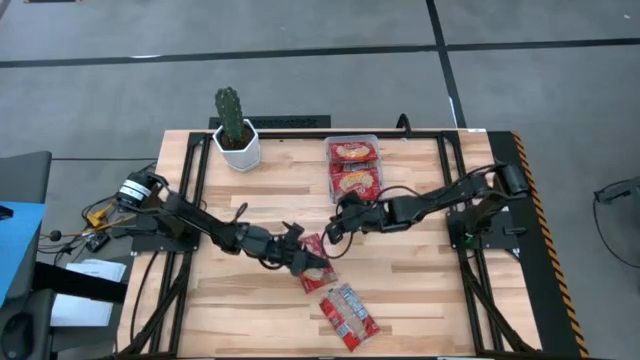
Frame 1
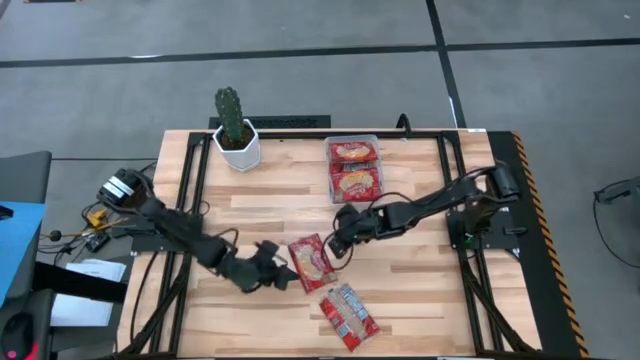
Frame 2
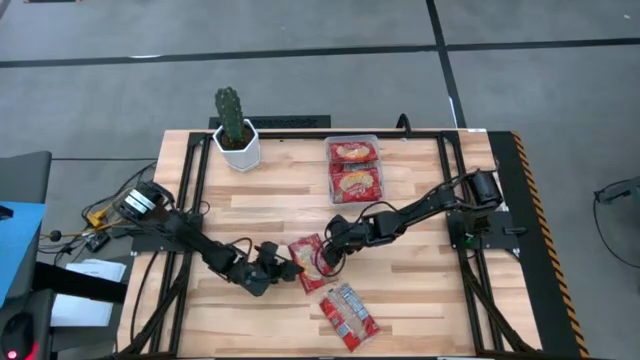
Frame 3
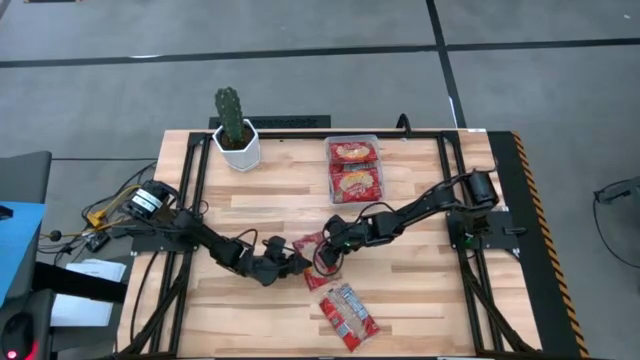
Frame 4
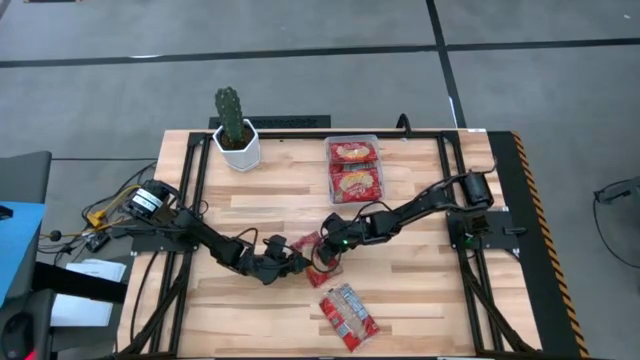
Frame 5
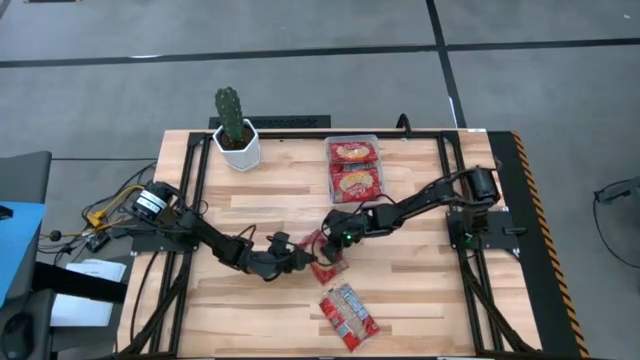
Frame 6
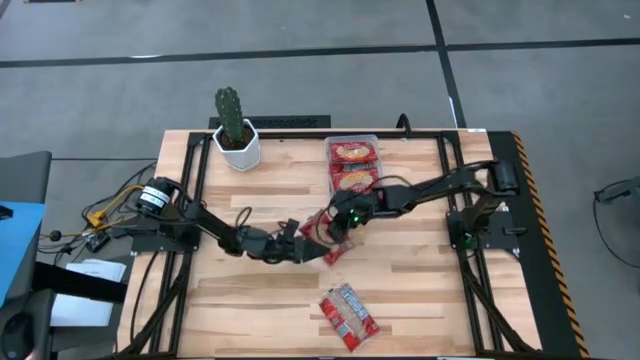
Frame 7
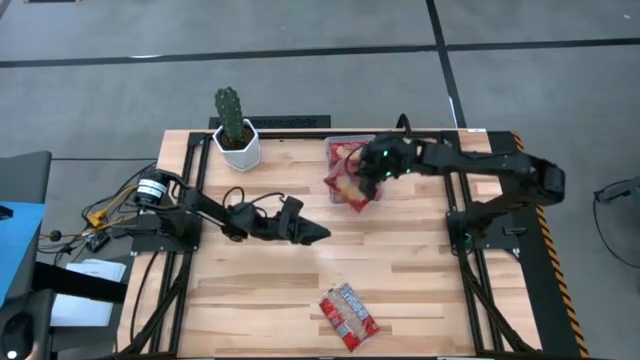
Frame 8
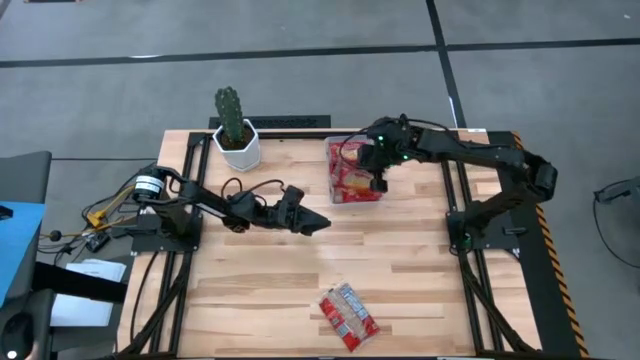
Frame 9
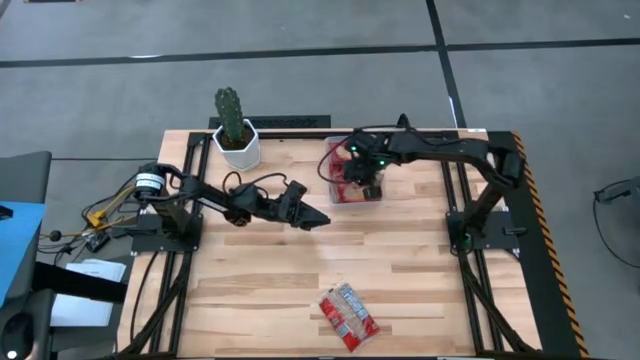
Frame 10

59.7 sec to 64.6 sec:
Task: Sort popcorn bags into baskets
Put the popcorn bag into the transparent bin

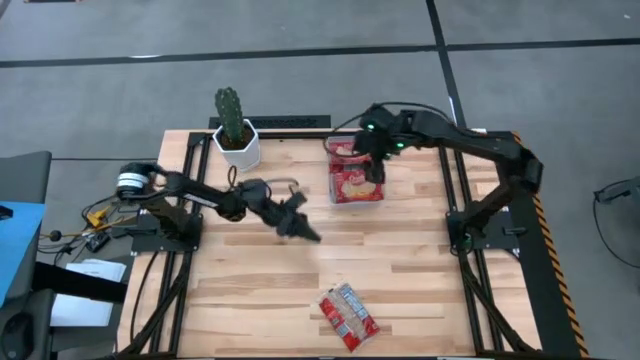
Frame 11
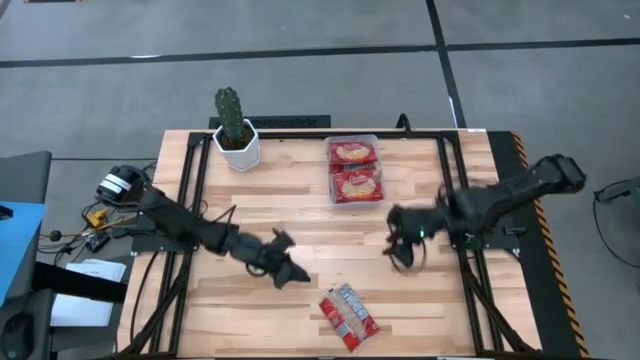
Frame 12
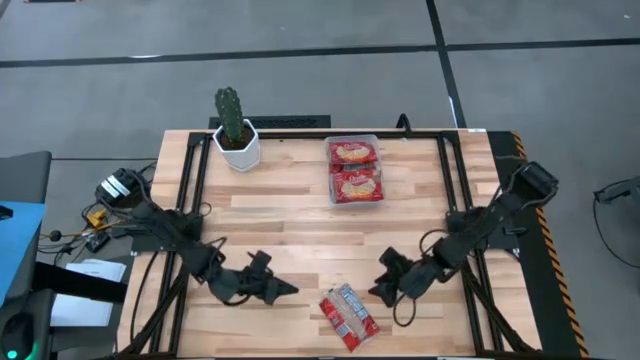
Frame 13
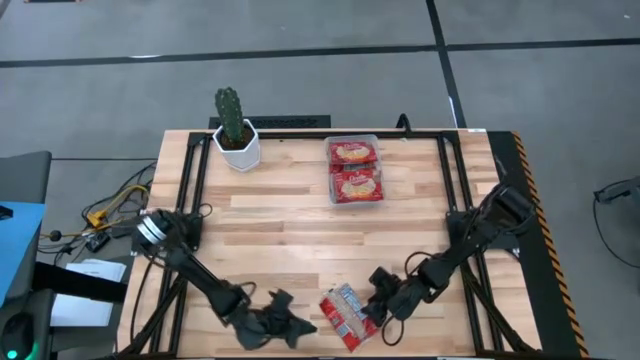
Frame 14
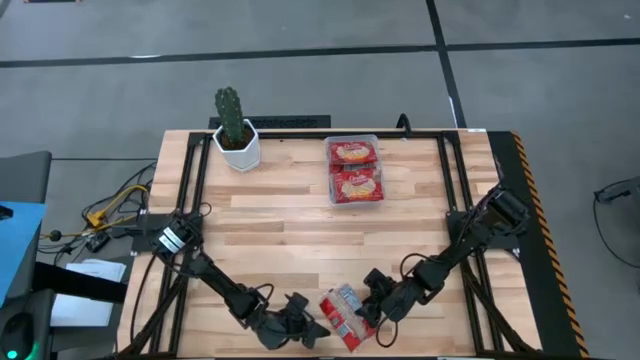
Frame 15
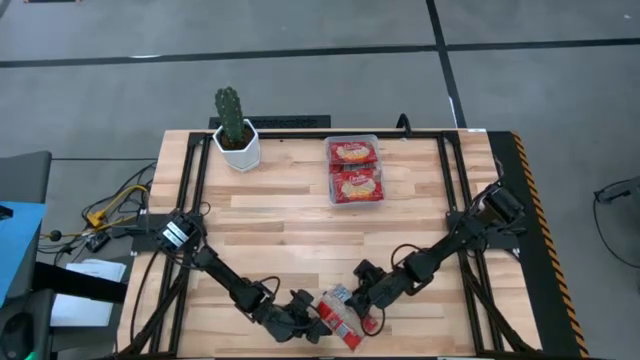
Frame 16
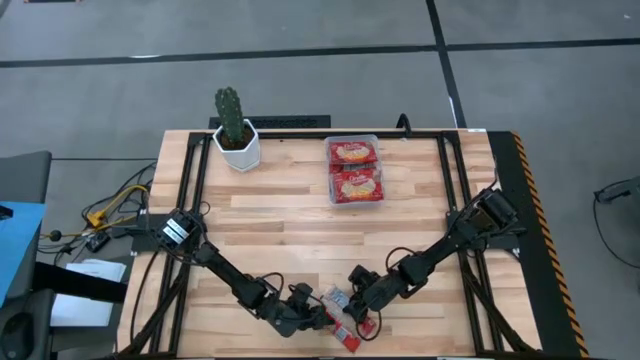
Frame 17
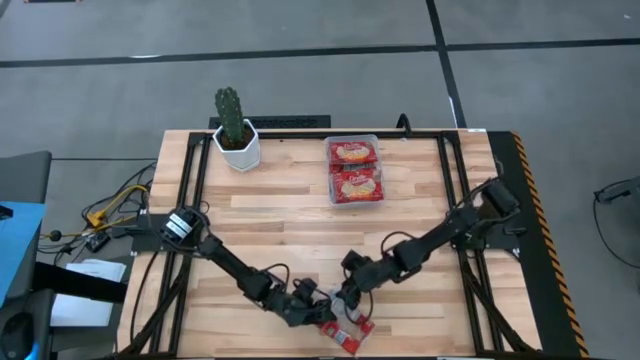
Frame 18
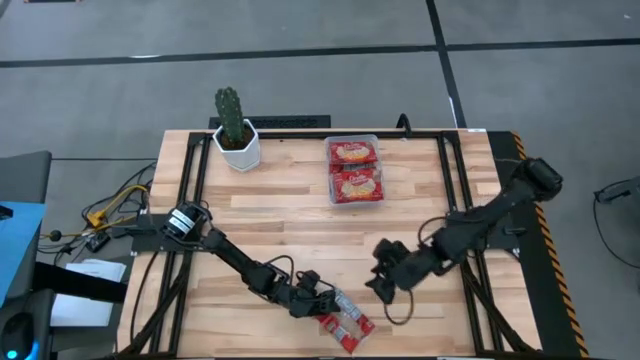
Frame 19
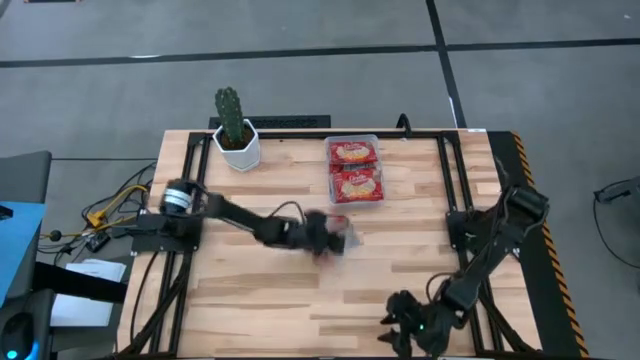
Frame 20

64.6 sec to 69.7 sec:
Put the popcorn bag into the transparent bin

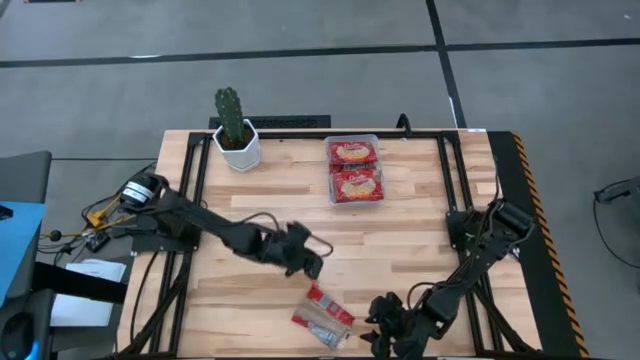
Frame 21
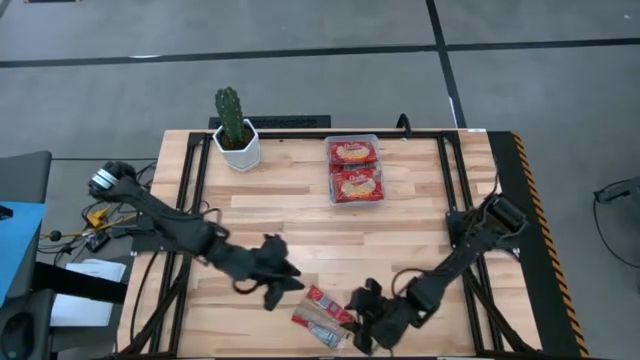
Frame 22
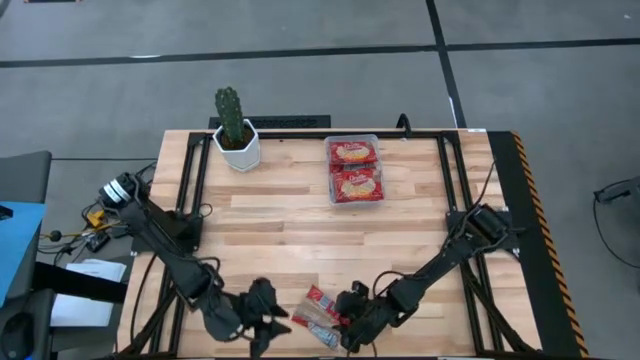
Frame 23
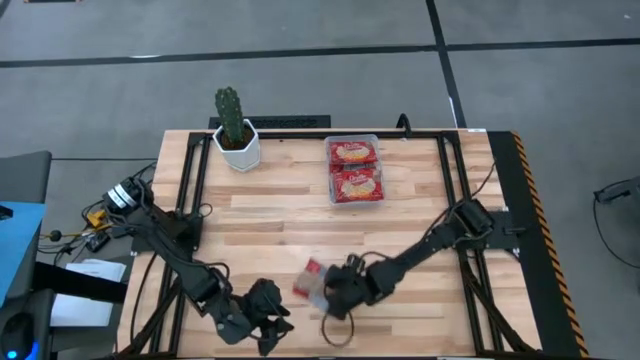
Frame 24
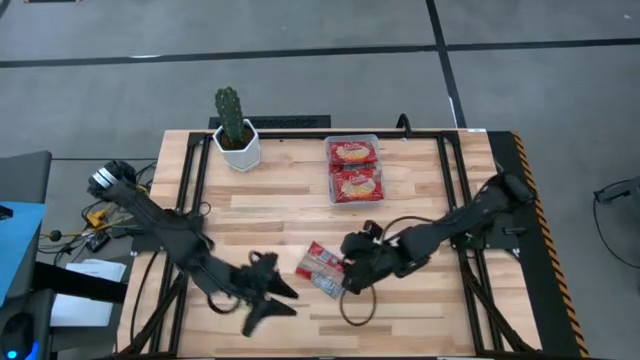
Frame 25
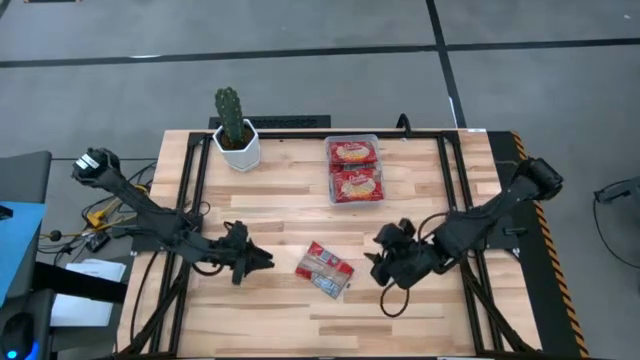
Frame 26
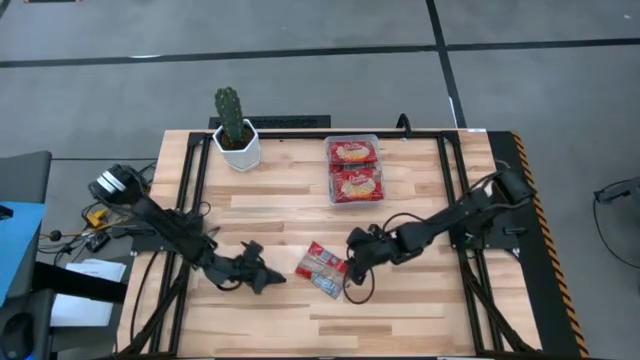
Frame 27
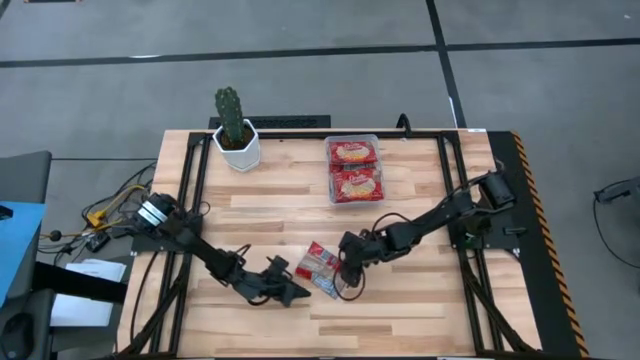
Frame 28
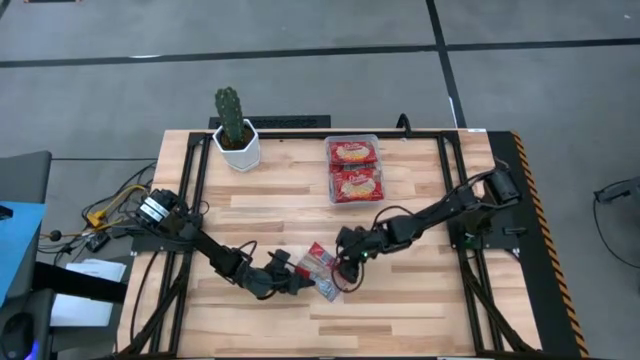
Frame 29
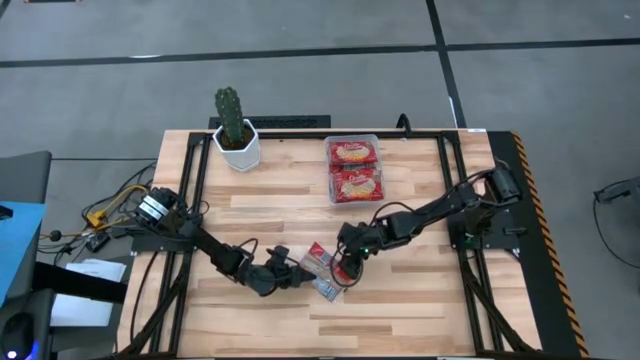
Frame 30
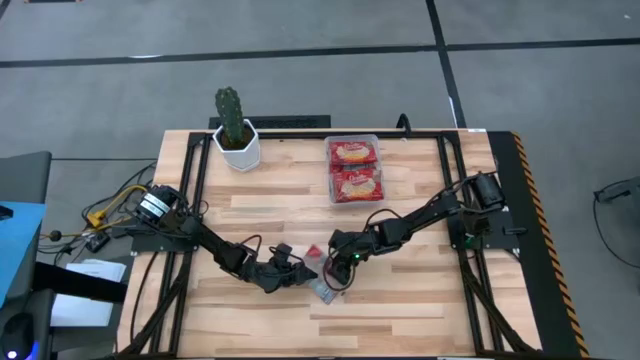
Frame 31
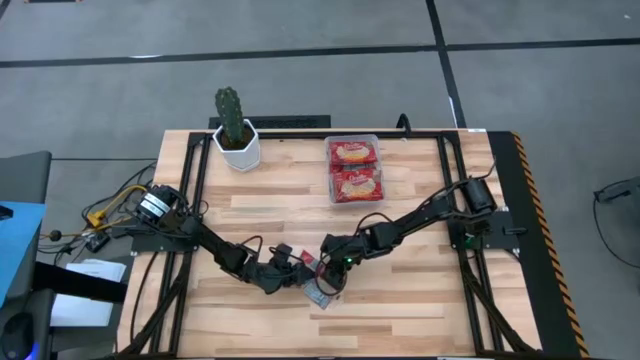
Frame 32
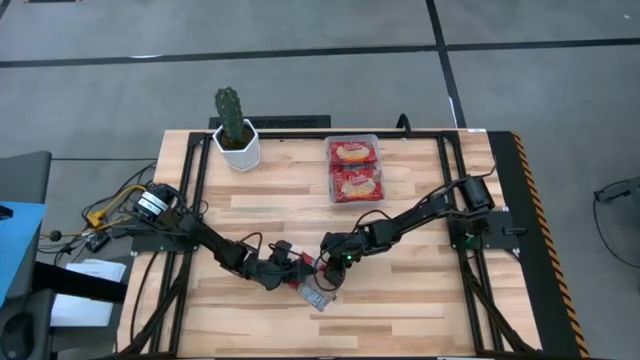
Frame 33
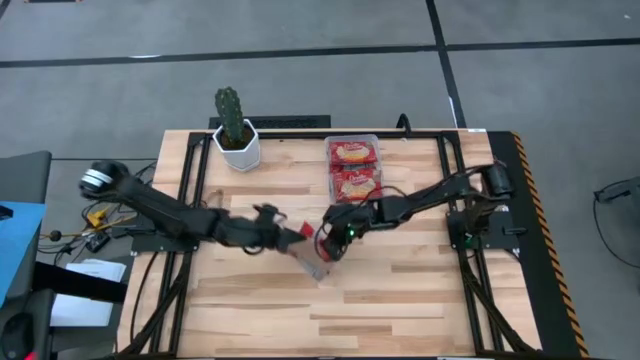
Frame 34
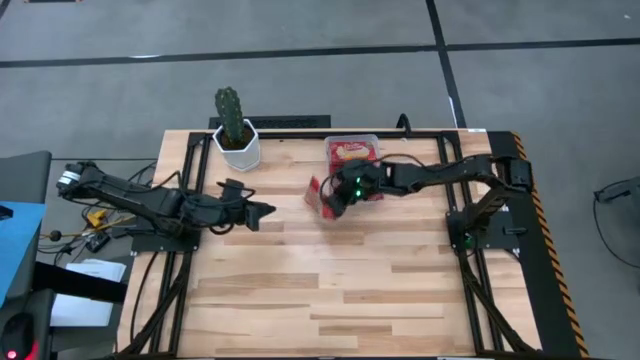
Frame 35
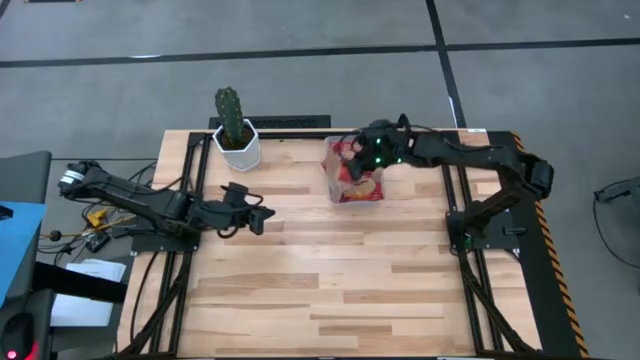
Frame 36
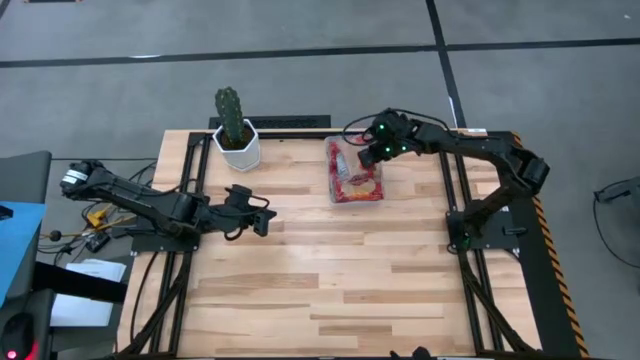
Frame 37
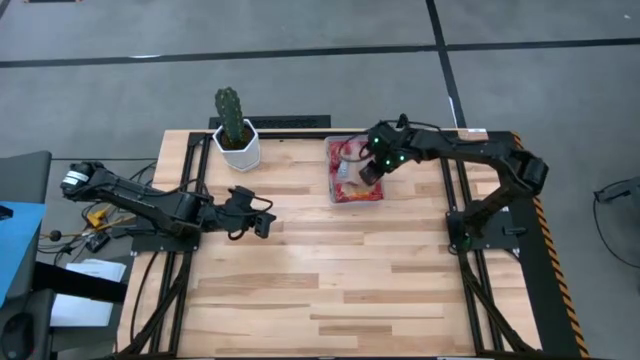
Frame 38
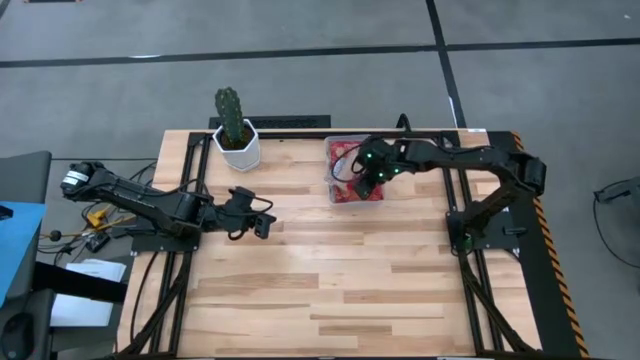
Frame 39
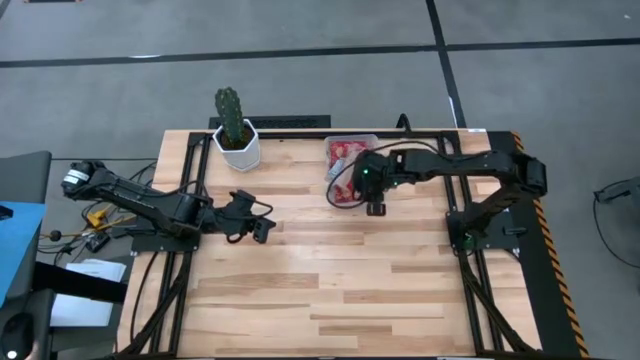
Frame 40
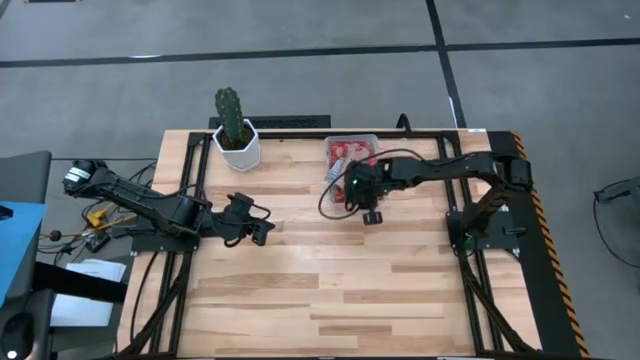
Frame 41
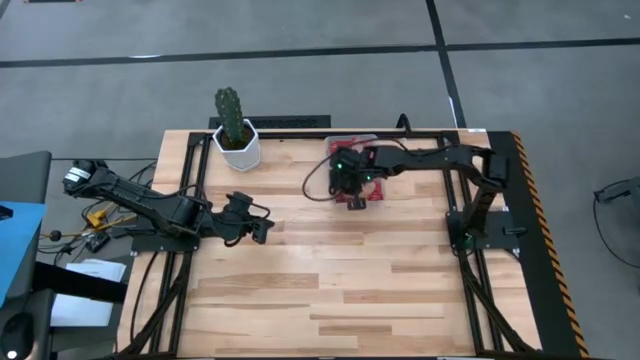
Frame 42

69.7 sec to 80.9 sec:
Put the popcorn bag into the transparent bin
